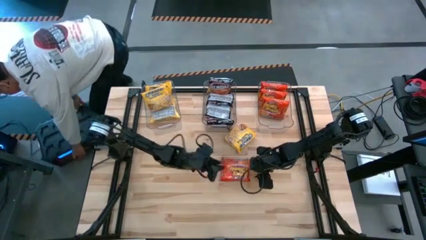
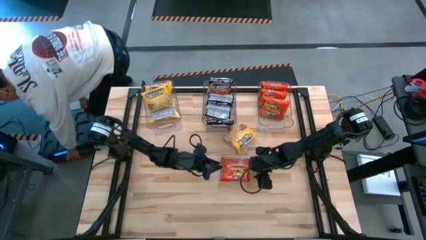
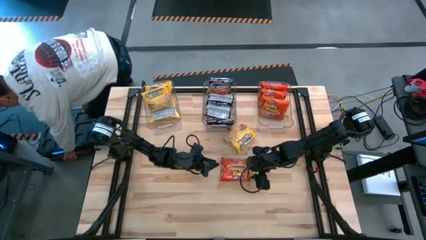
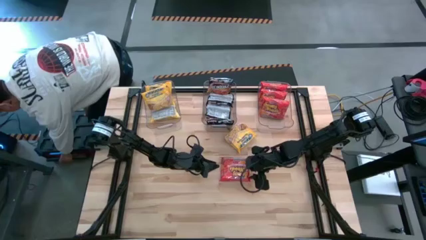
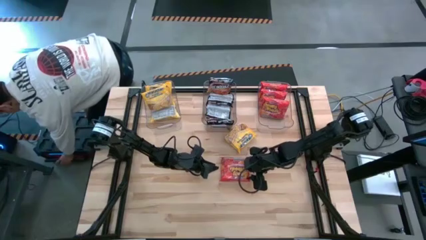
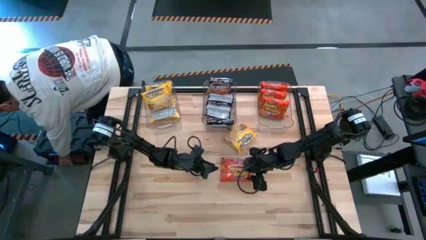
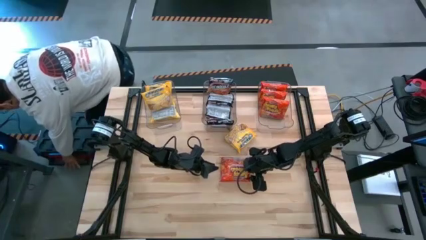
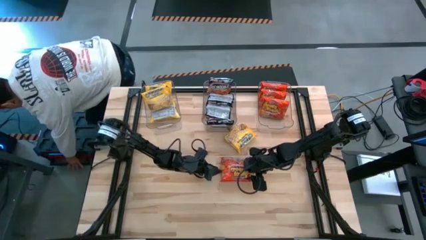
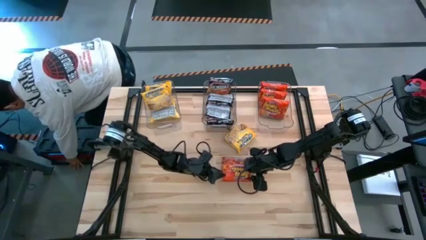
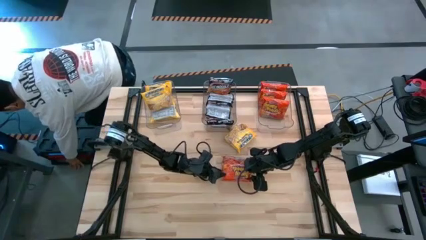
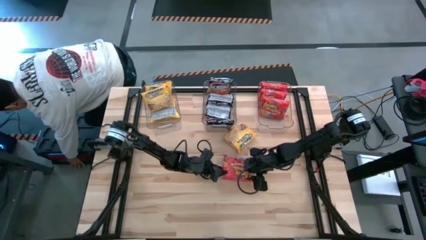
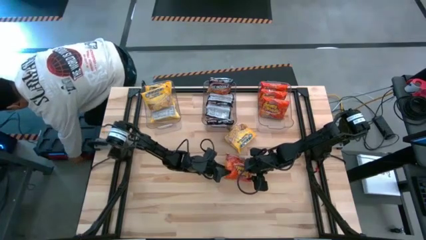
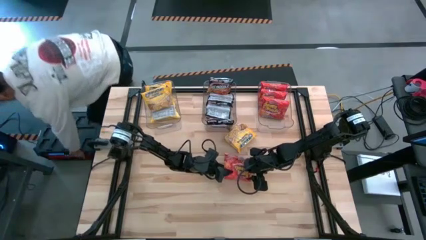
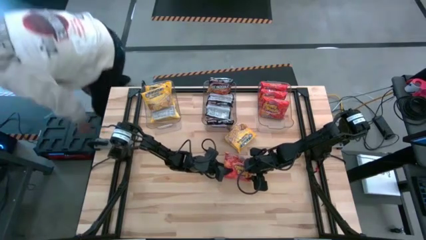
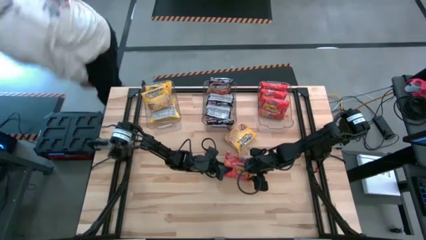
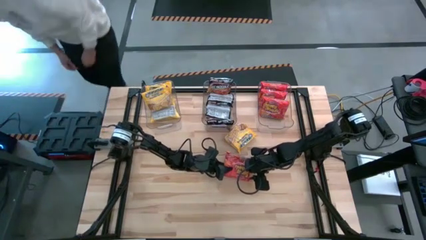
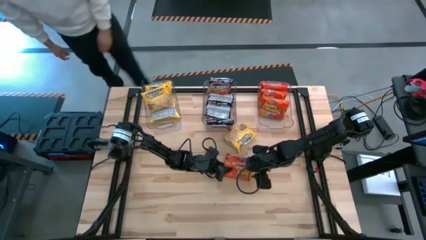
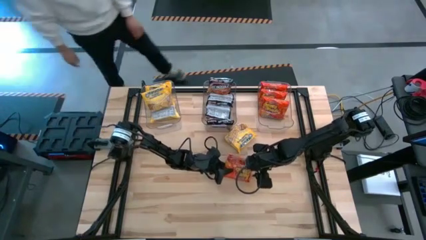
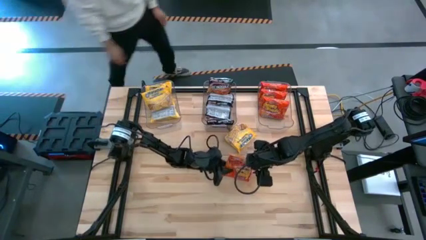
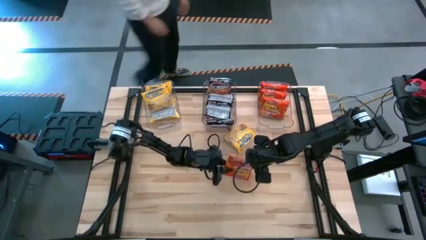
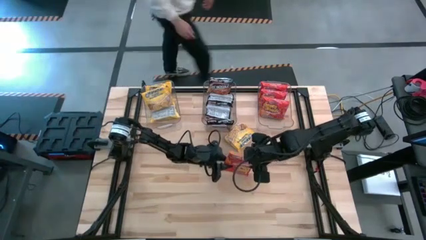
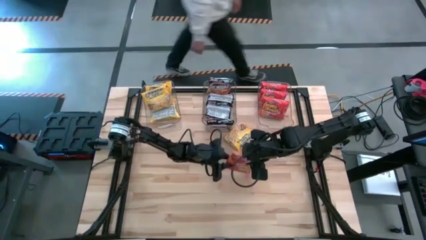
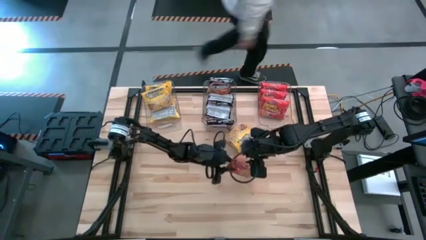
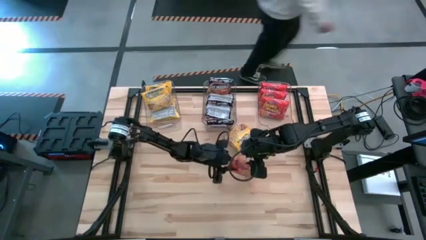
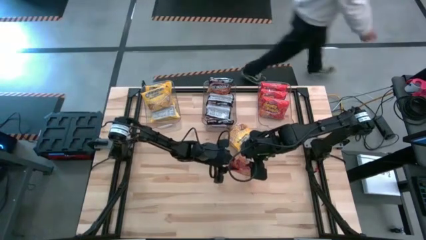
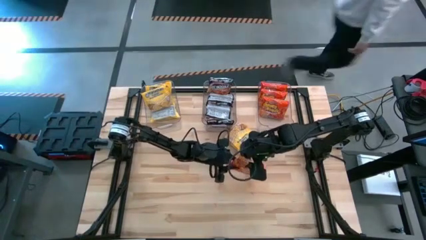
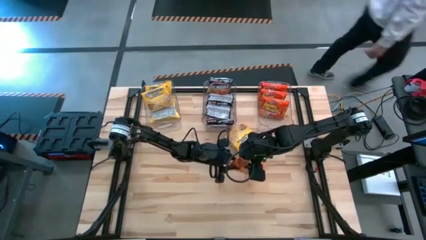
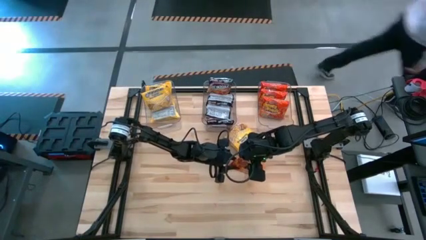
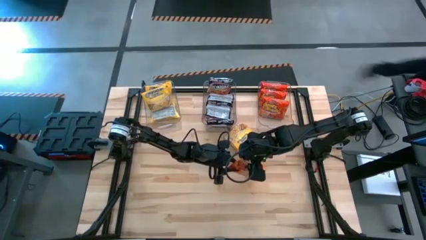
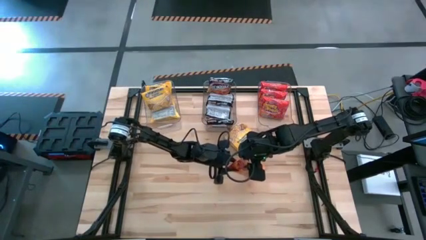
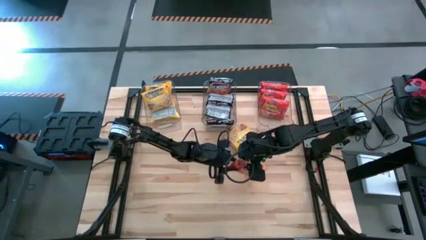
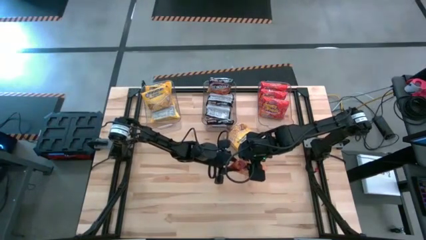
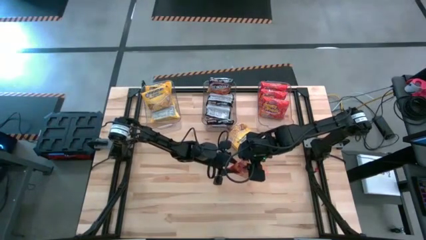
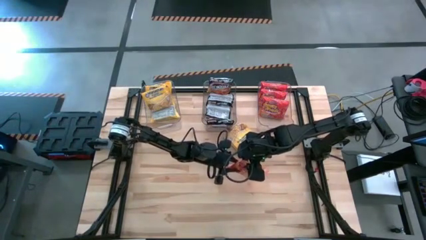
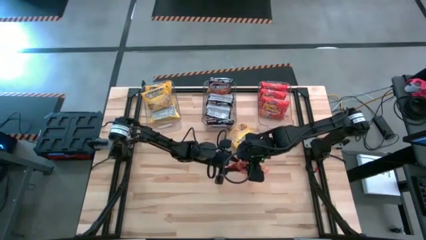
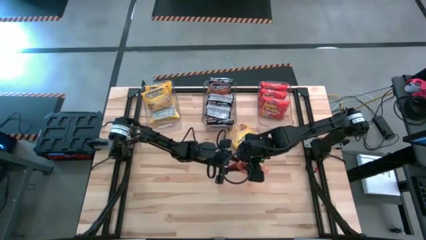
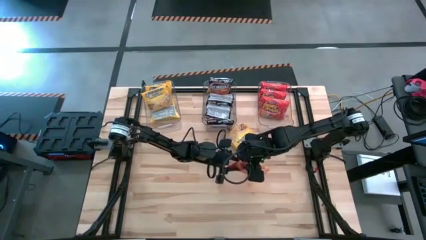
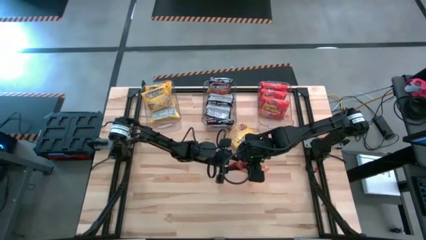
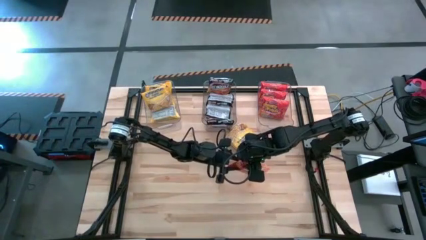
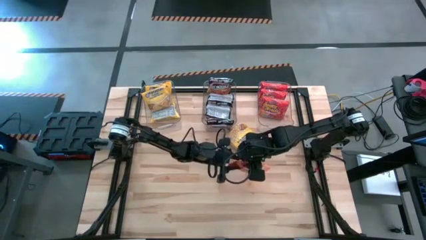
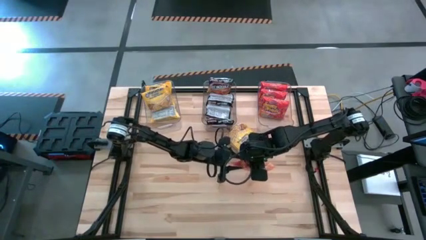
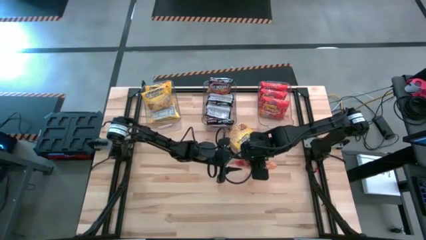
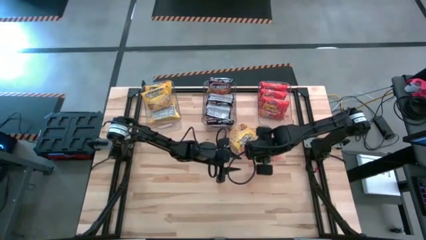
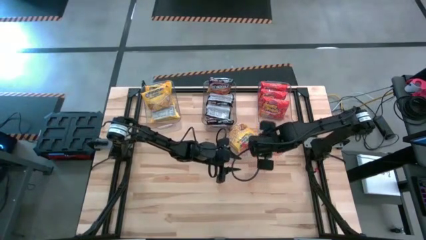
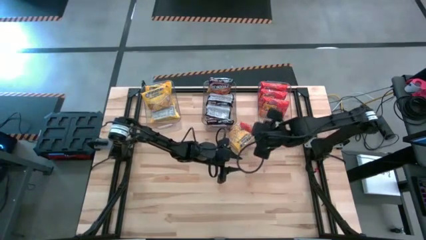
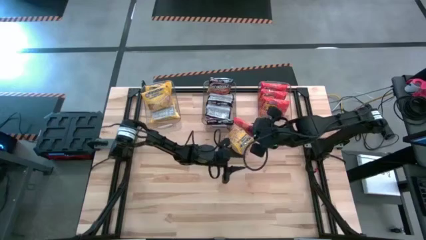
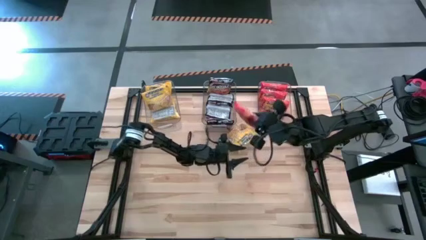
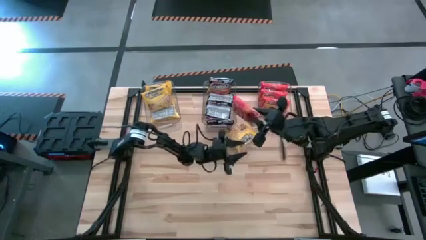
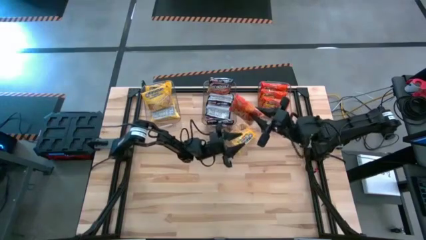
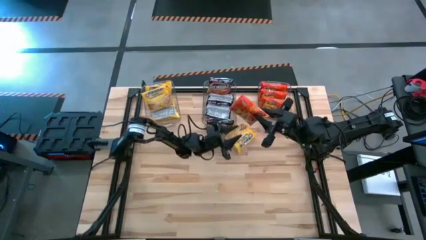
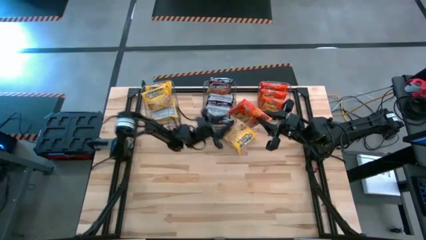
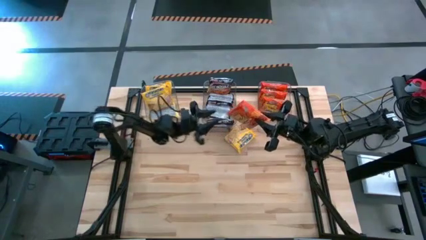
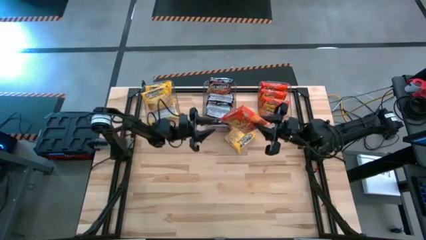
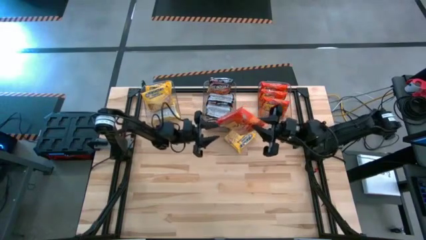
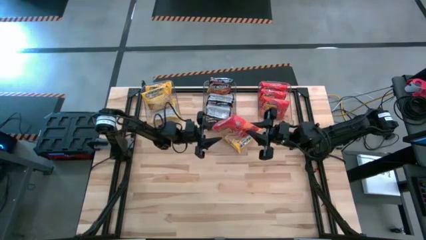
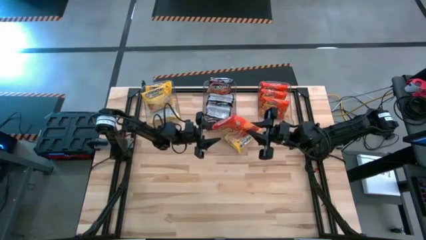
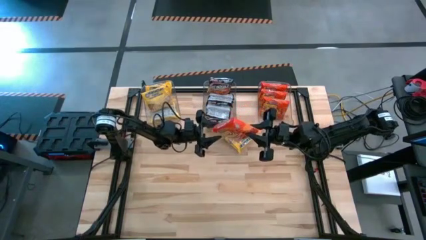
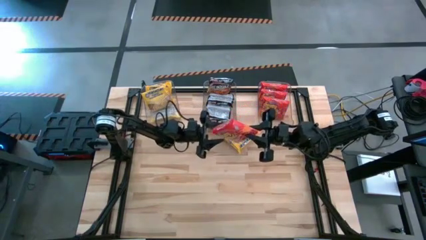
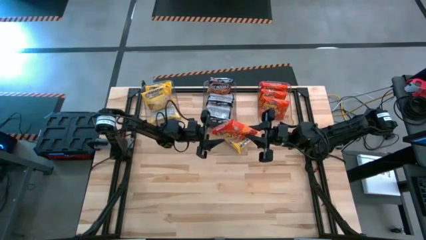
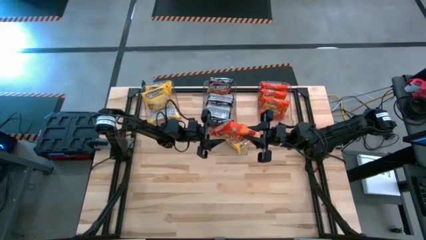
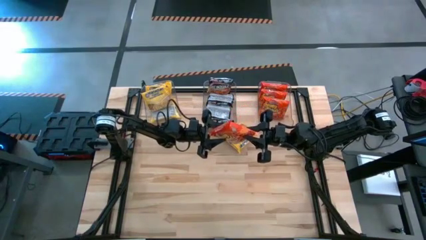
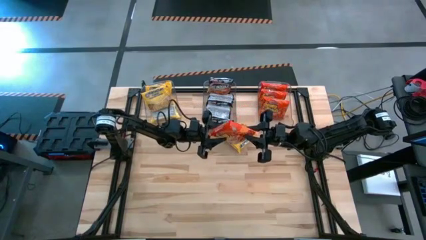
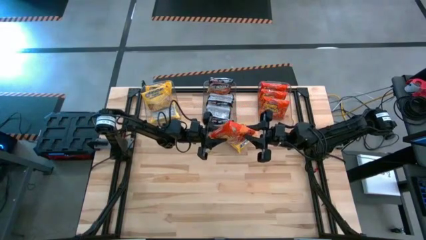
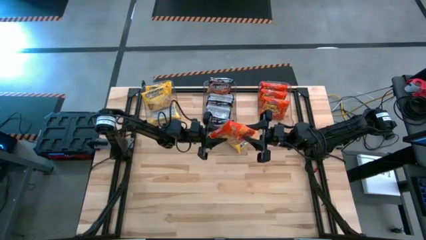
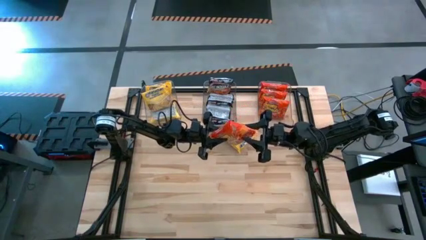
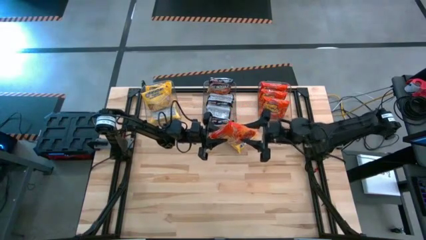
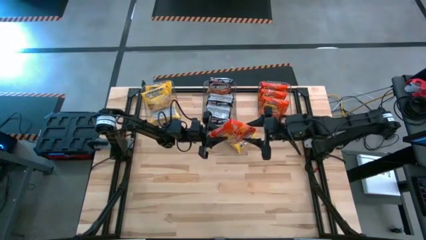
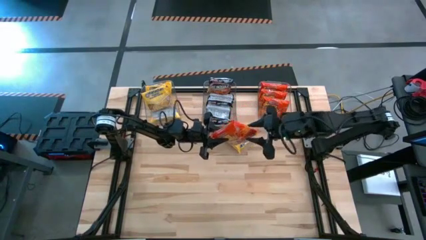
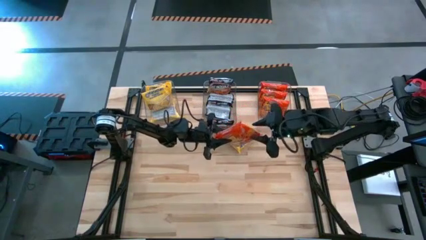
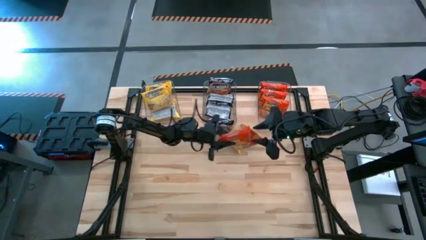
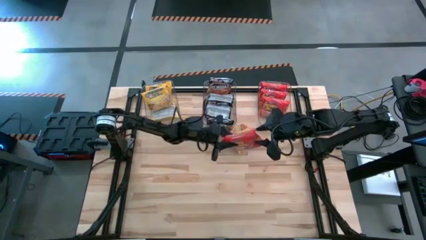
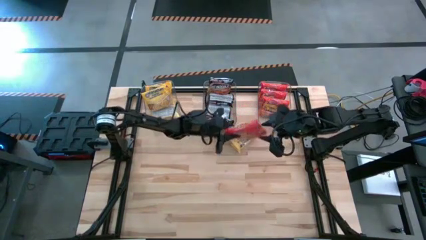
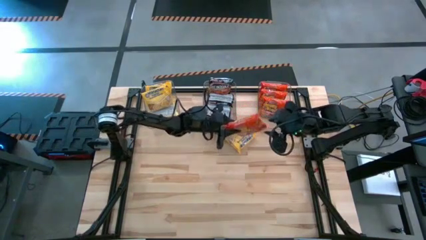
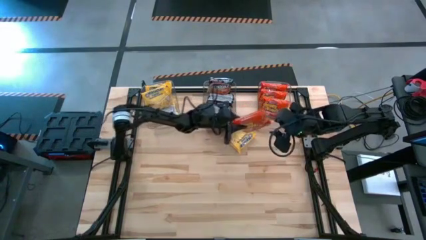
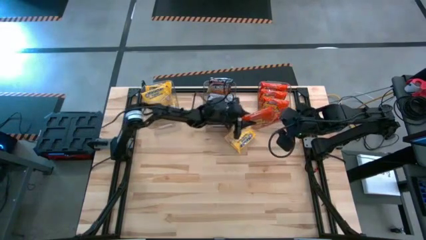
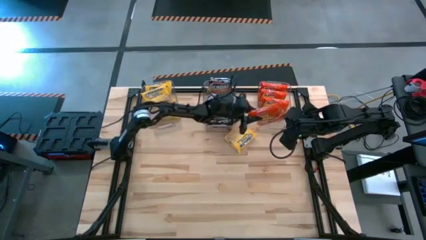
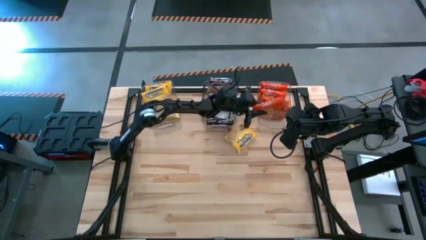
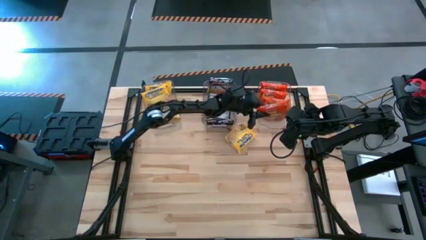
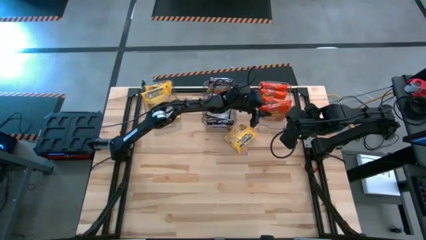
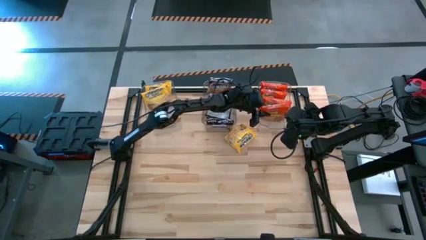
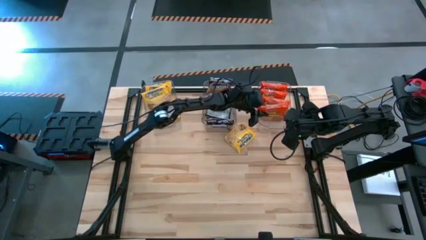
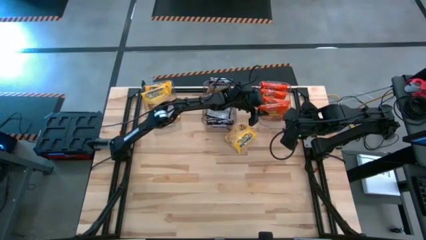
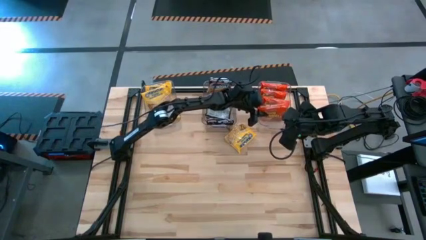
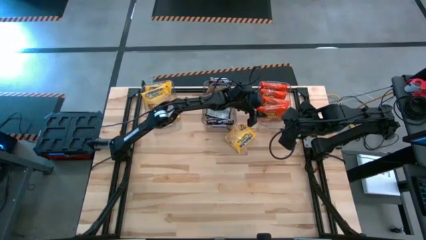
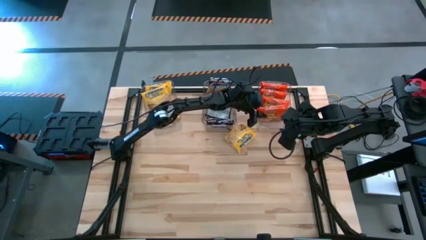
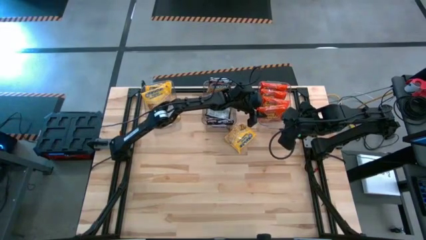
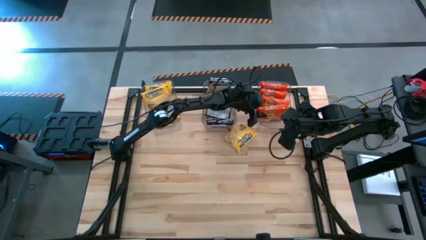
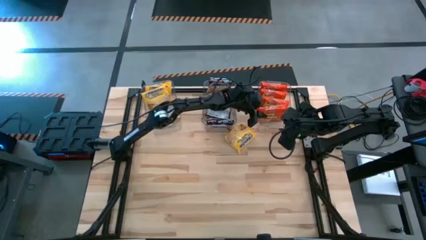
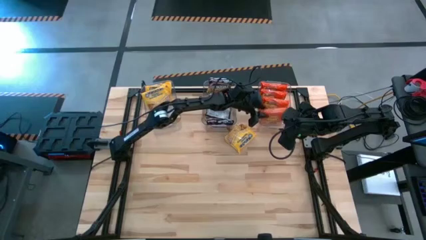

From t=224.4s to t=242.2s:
Task: Sort Maruchan noodles
Put the orange instant noodle pack into the right transparent bin
